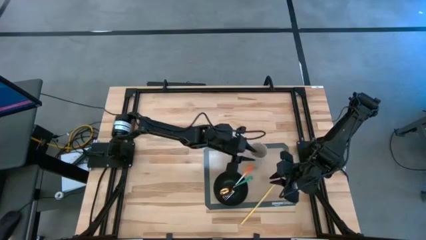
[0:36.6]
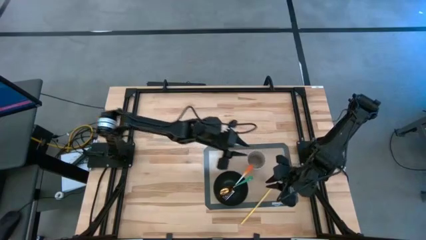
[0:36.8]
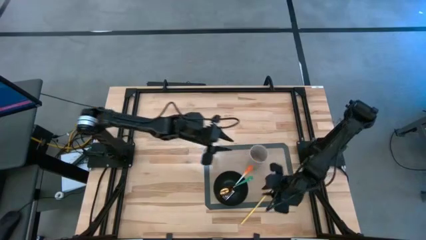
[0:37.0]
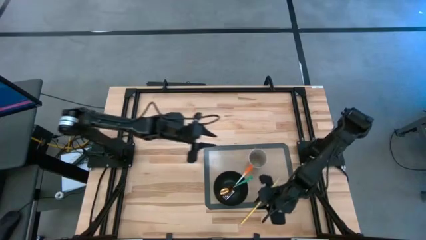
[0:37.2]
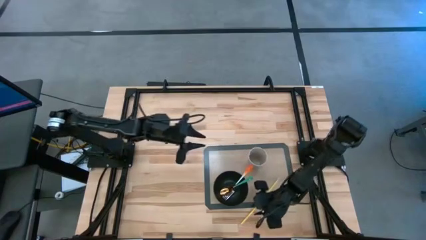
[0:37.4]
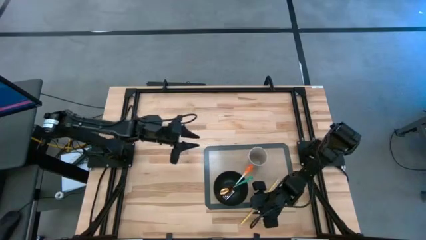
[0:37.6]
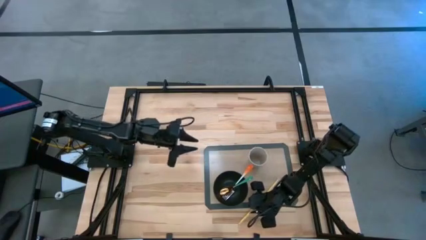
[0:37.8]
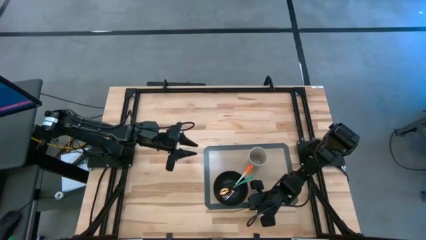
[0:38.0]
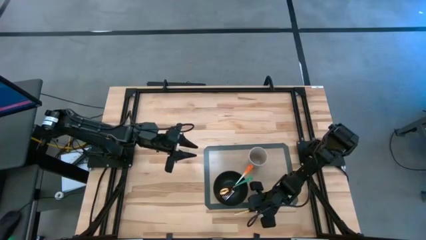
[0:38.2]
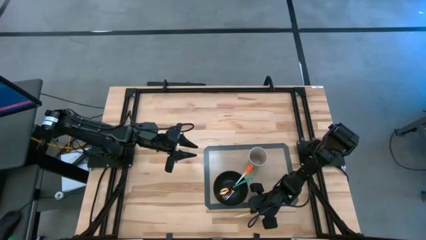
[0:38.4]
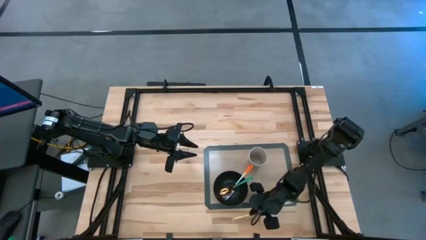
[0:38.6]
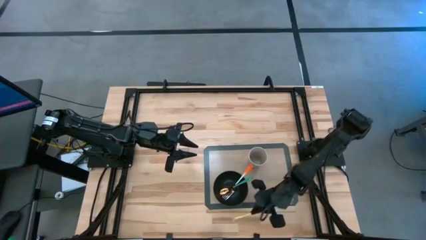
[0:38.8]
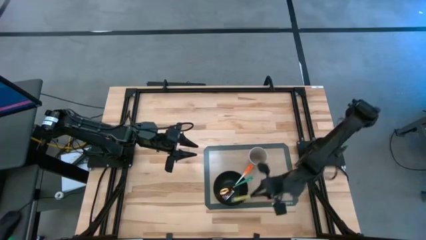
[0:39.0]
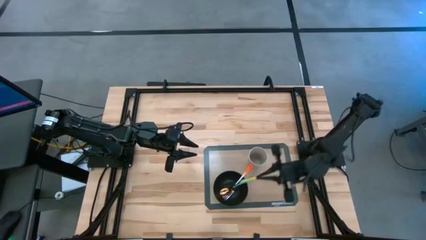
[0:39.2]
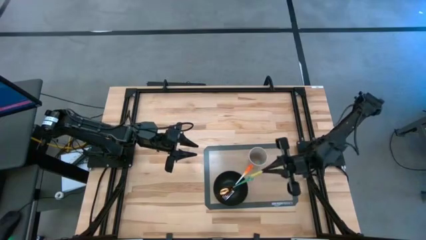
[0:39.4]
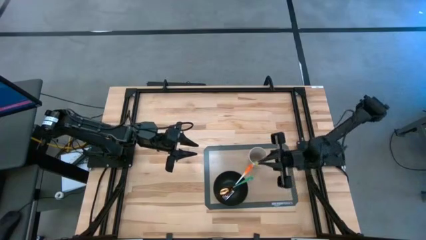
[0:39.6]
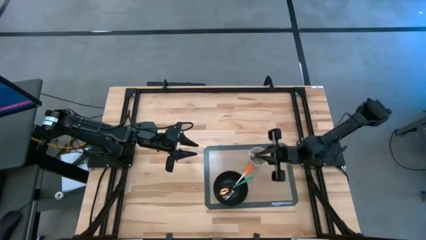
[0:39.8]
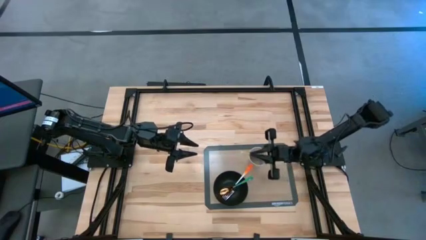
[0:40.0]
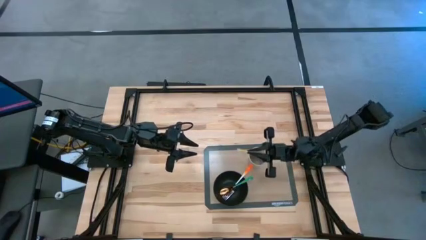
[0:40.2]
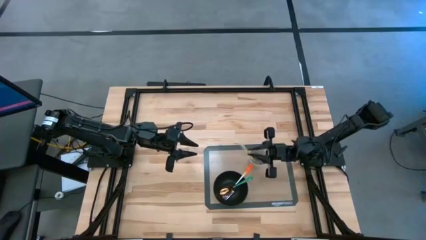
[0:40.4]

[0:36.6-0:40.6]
Task: Pick & Place Utensil
Put the yellow straw into the gray cup

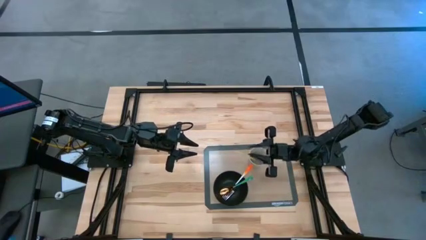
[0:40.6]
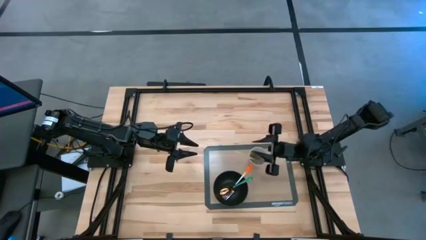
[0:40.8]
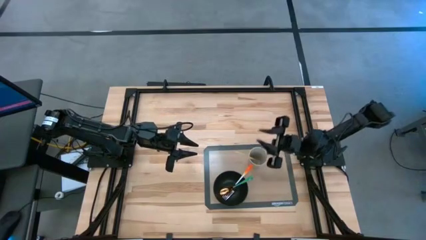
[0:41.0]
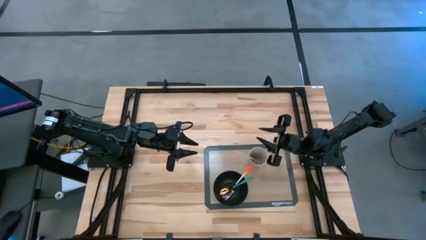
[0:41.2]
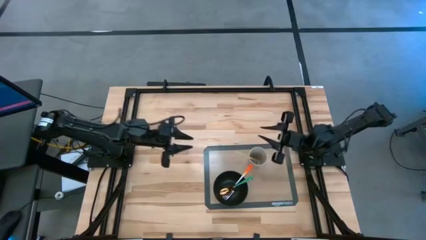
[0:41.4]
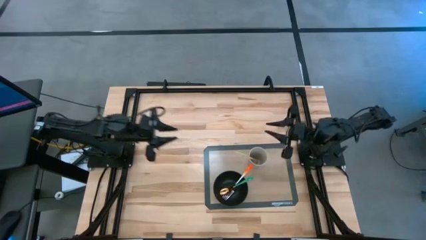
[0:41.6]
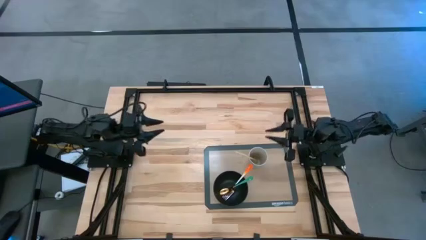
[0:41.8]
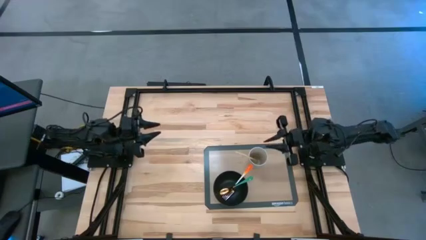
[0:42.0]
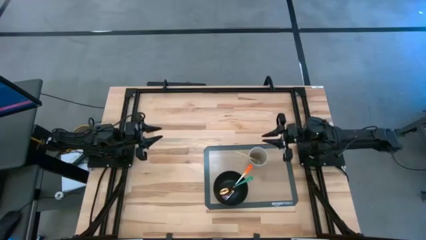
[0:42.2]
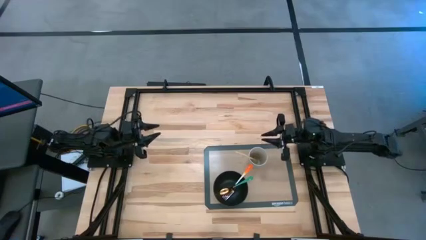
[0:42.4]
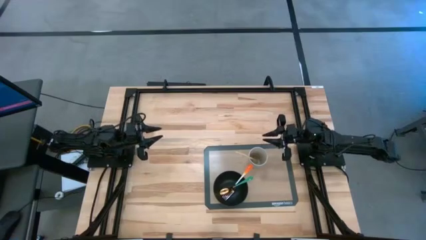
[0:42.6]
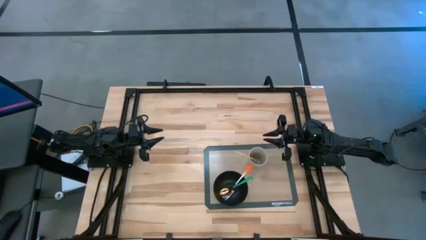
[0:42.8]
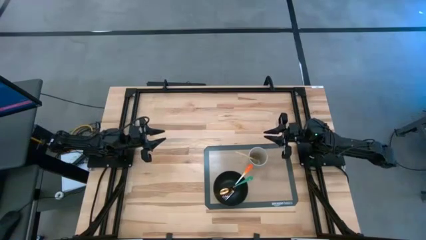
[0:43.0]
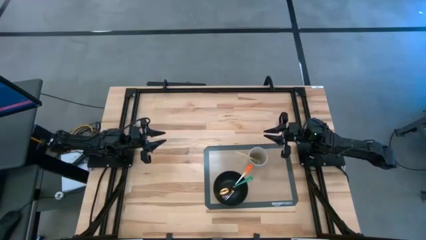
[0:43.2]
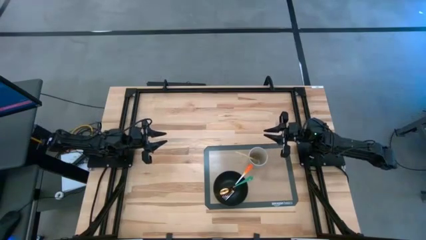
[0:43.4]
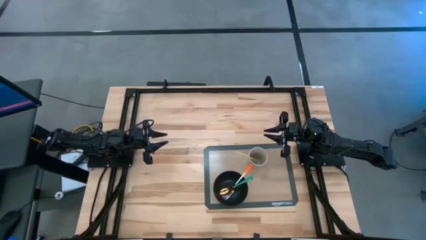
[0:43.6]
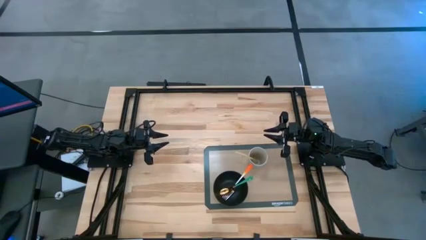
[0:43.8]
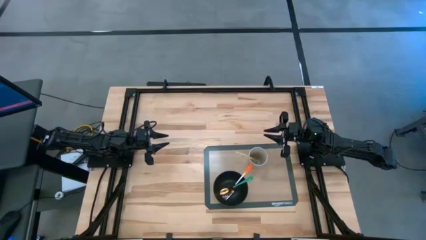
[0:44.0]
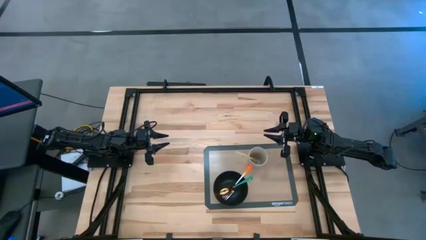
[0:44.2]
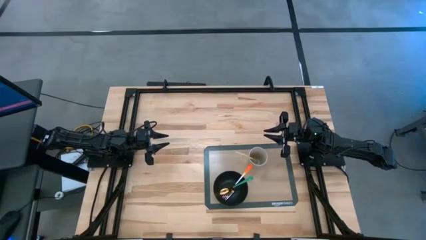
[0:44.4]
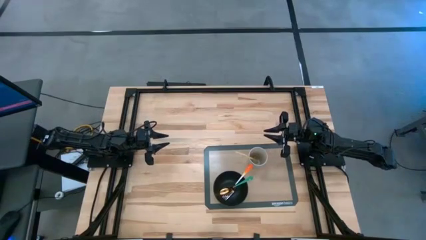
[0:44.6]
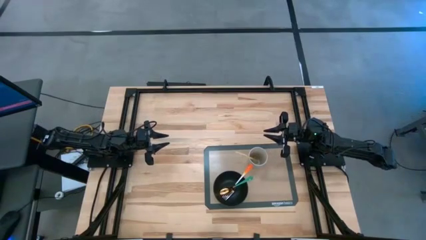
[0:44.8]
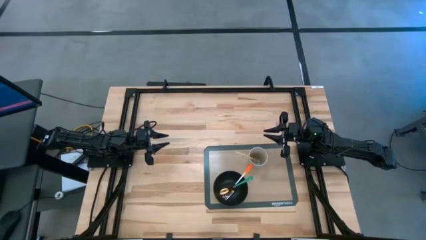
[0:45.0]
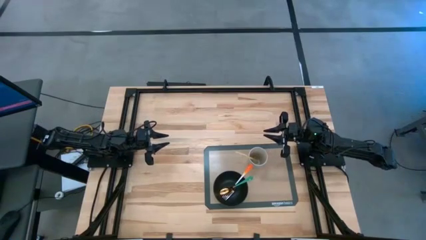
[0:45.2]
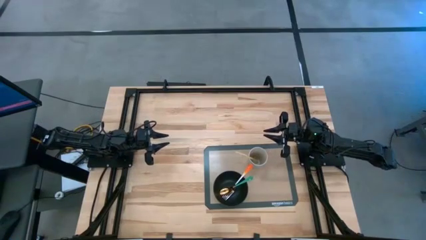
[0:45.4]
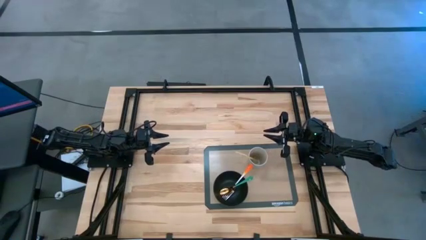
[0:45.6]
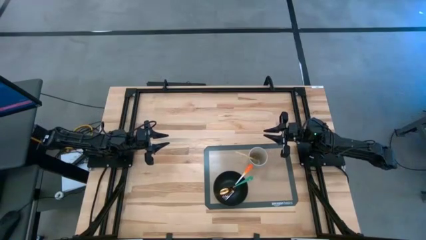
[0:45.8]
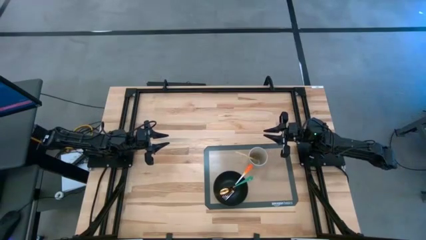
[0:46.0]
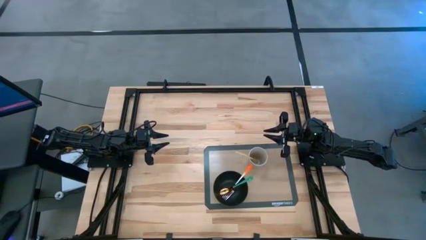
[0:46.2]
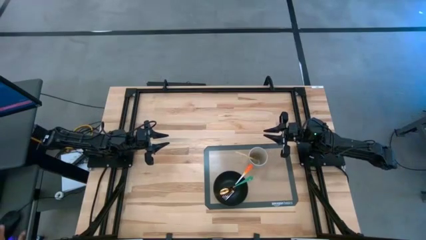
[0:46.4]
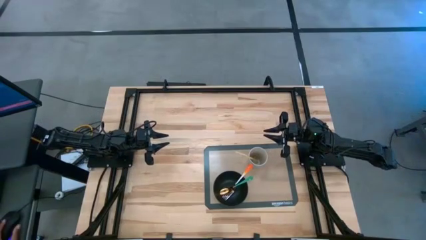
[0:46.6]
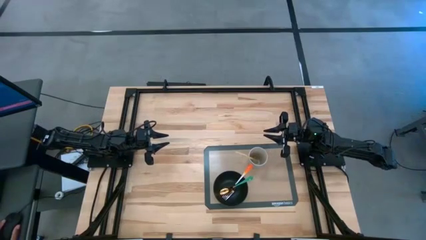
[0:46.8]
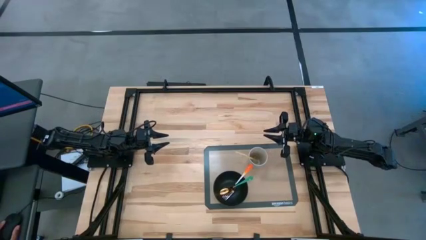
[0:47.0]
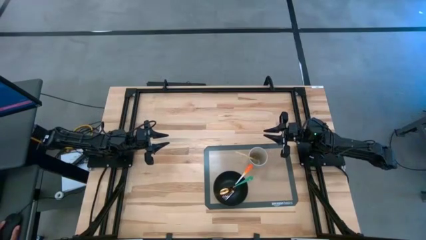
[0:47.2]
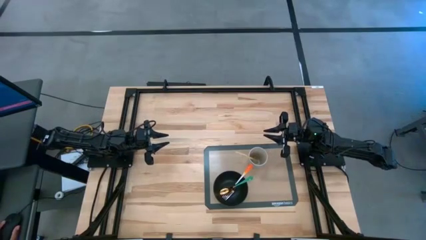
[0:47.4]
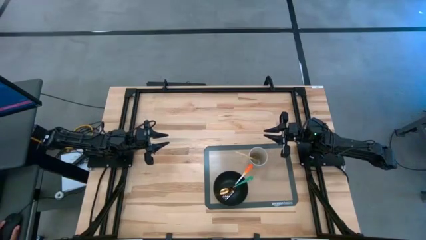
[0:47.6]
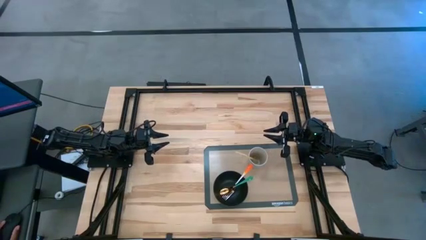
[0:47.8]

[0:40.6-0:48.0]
Return to Home Position

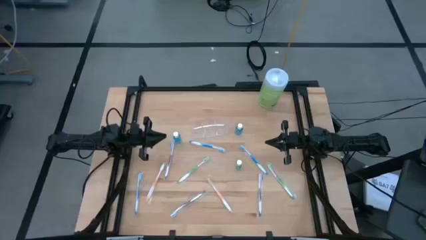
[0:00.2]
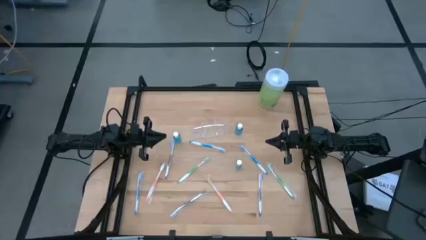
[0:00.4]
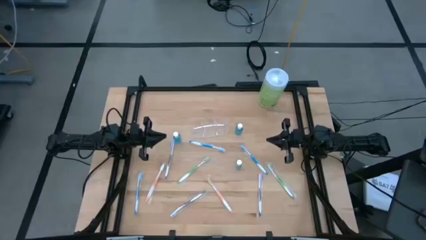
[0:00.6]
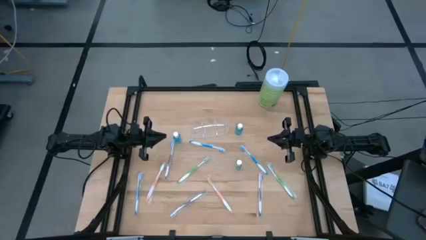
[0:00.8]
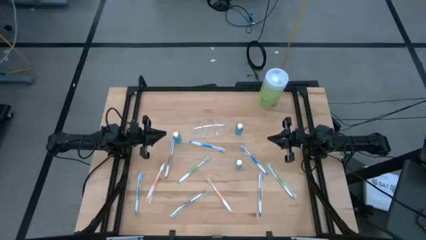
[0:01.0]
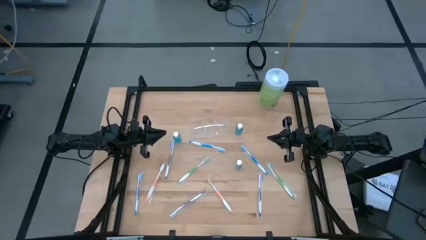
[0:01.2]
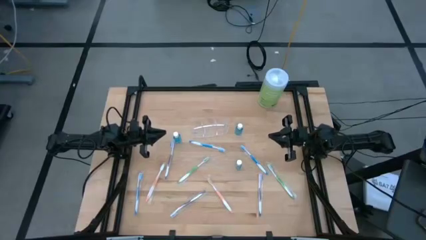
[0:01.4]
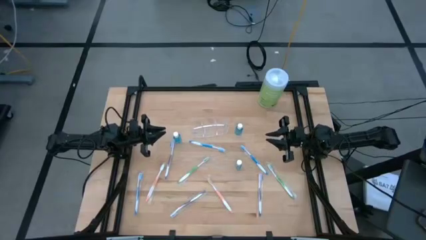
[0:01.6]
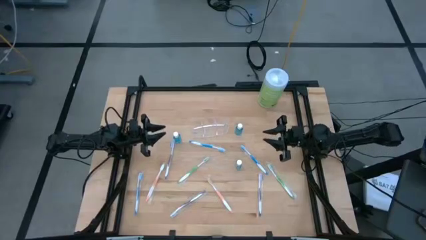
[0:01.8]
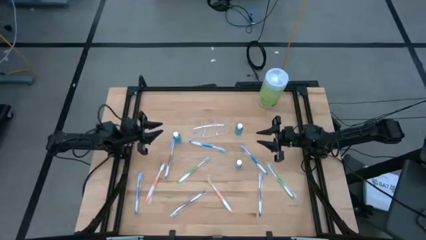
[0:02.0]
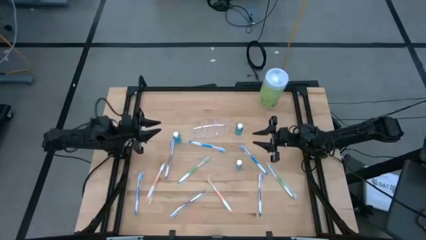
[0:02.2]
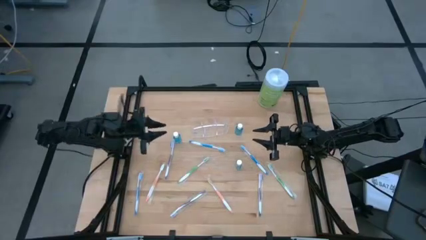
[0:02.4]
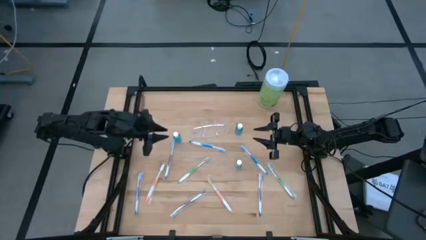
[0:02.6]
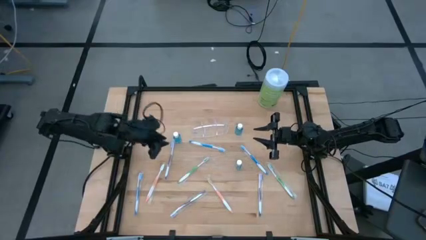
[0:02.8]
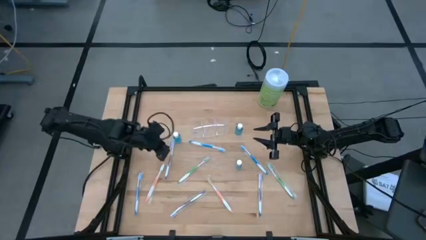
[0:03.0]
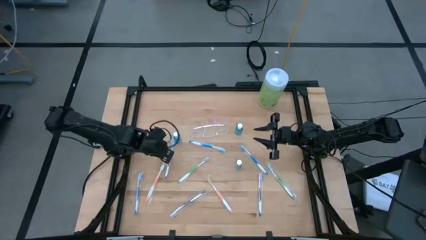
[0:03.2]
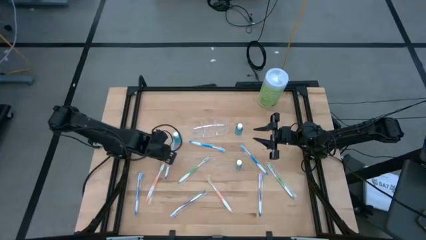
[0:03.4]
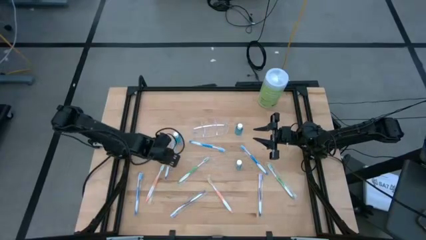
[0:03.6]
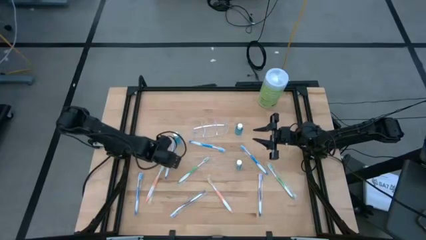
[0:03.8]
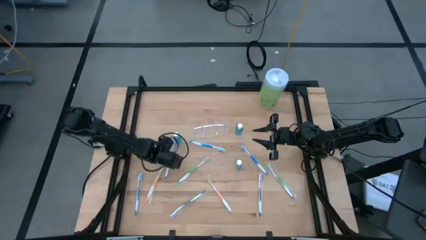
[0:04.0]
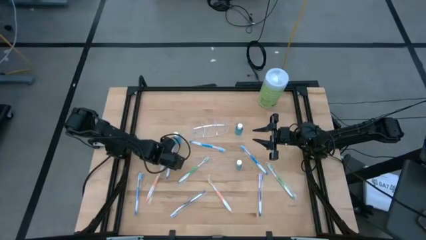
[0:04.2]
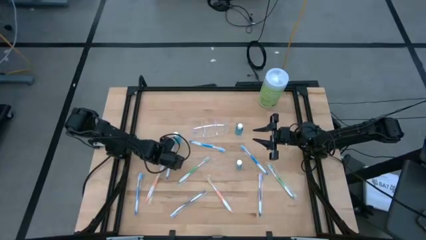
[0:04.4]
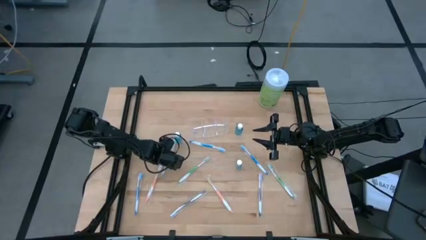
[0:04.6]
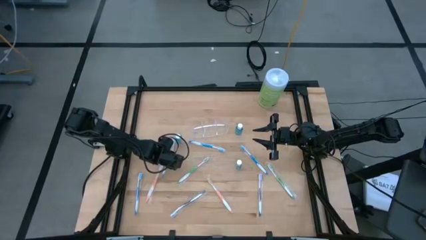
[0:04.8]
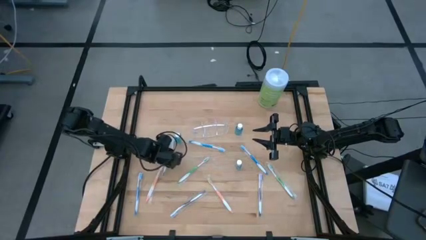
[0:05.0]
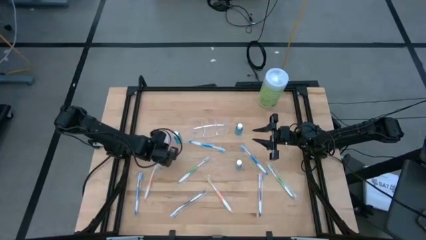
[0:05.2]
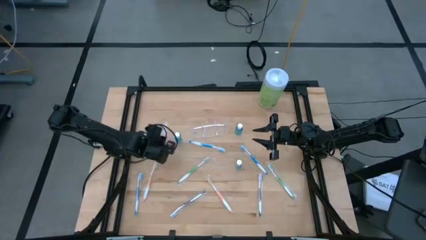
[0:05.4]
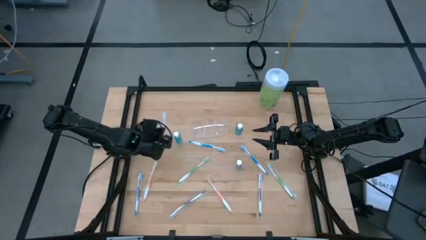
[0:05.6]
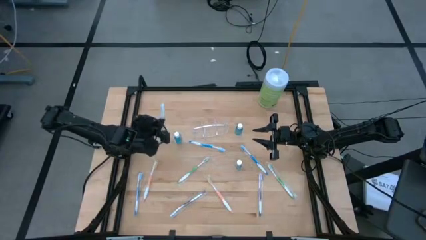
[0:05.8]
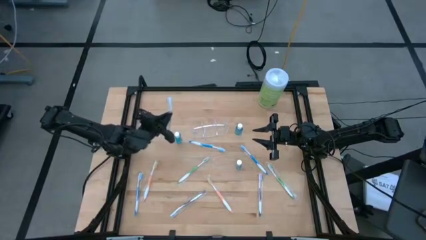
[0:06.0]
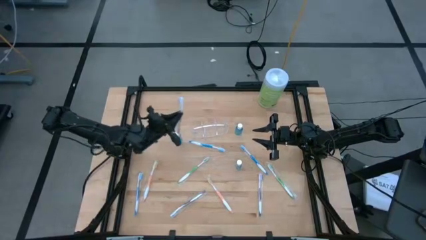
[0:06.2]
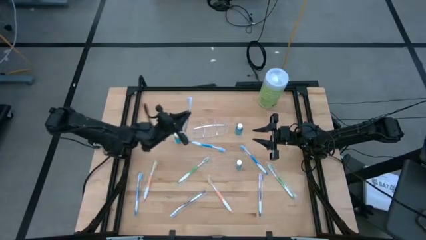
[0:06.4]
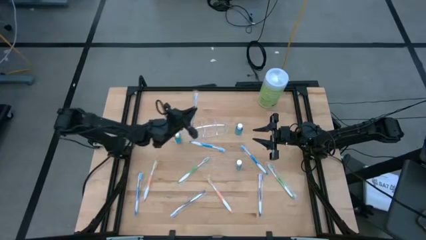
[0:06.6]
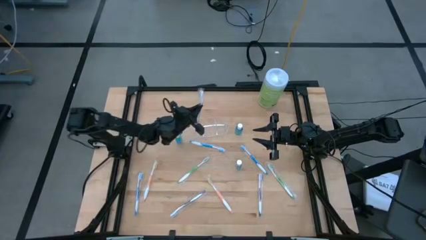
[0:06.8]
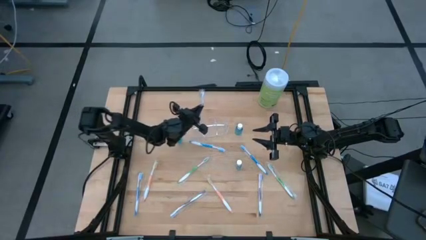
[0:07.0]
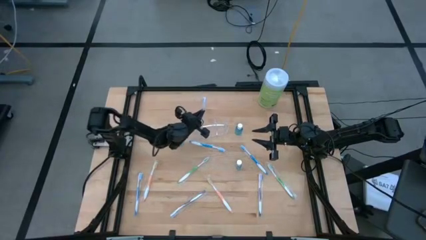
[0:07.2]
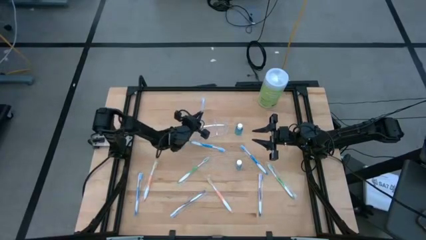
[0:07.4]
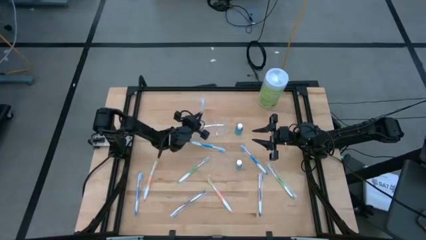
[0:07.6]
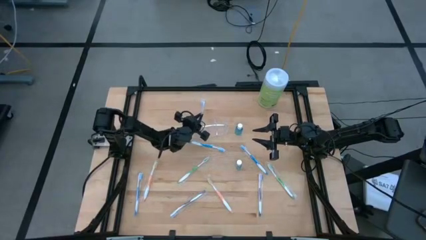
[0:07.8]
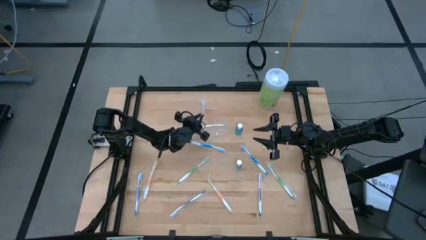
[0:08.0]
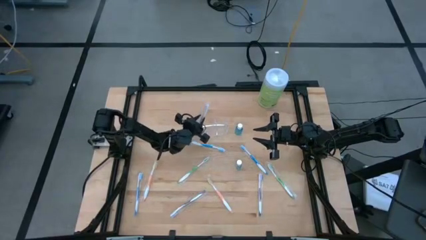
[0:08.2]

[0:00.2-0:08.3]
Task: Pick & Place toothbrushing station
Put the top left purple toothbrush into the transparent organizer
